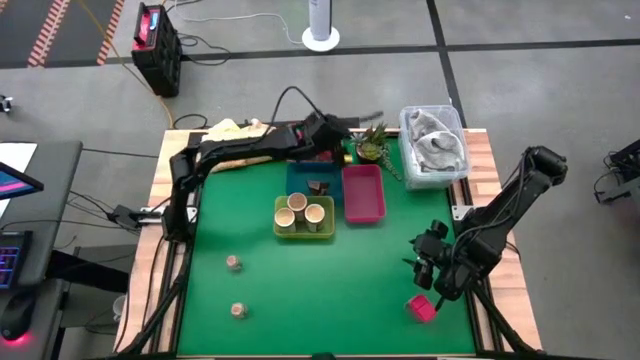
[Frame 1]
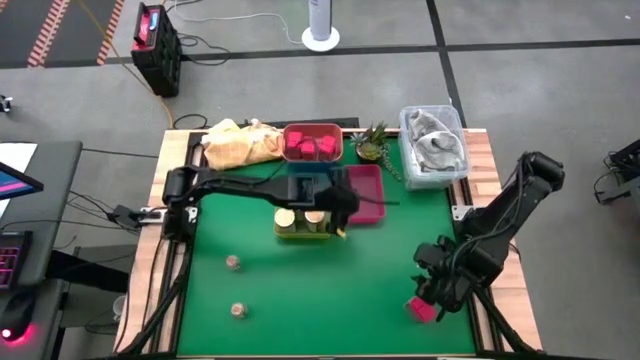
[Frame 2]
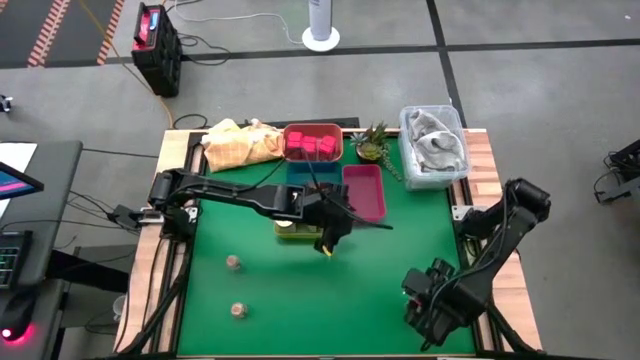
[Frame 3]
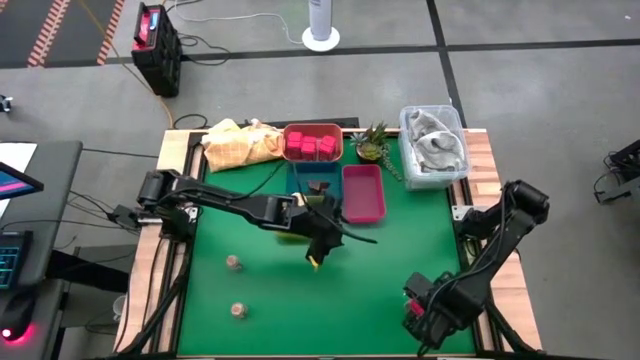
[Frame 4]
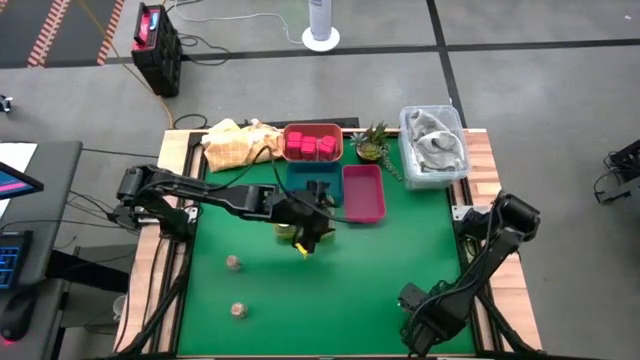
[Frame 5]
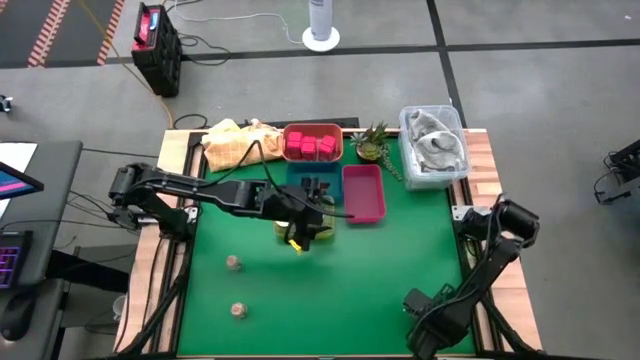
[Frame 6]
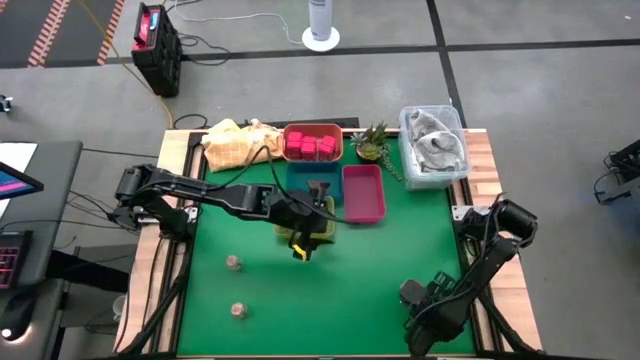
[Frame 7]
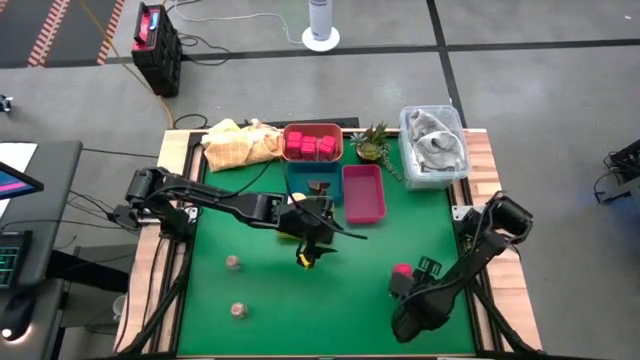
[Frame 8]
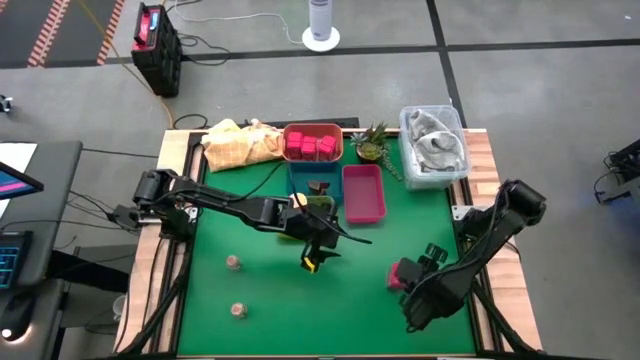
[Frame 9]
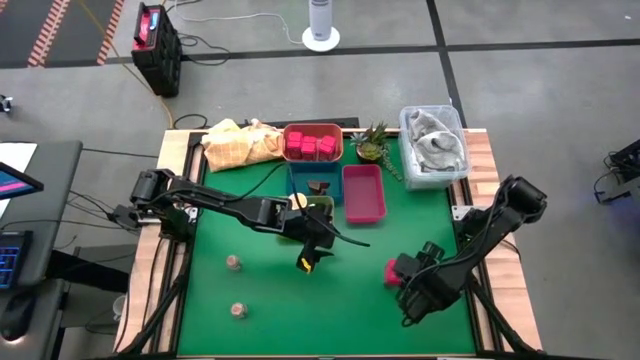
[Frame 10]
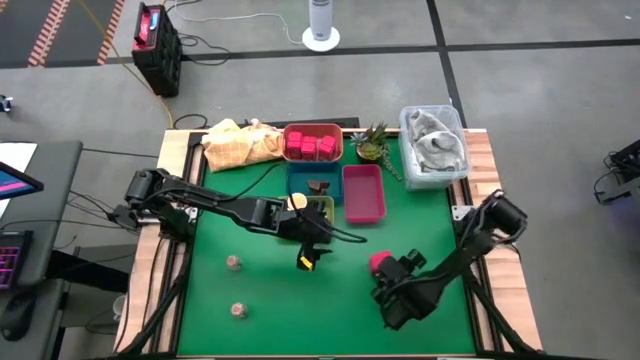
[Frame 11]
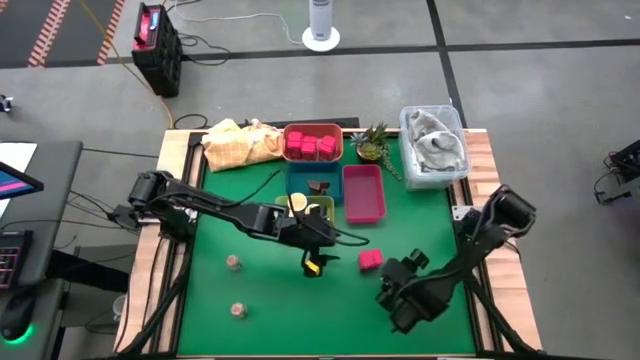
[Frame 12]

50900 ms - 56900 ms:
Task: Sort spices by type
Put the red seasoning tin into the orange bin

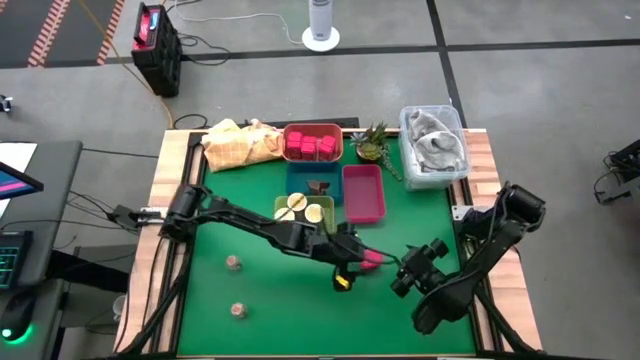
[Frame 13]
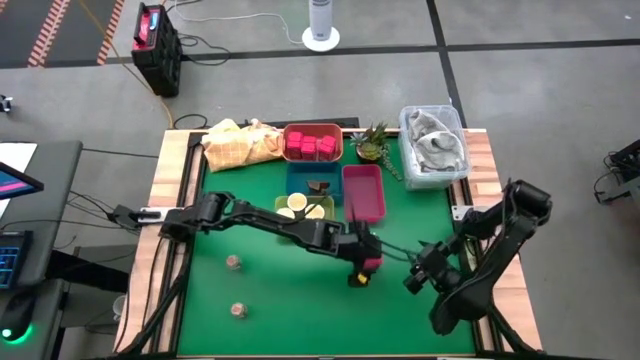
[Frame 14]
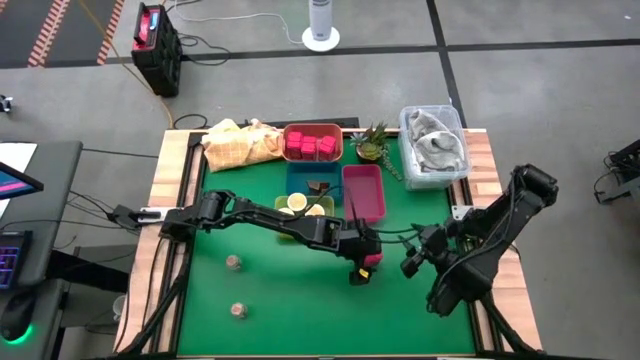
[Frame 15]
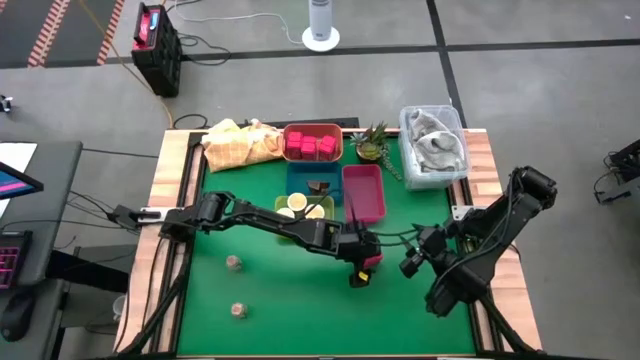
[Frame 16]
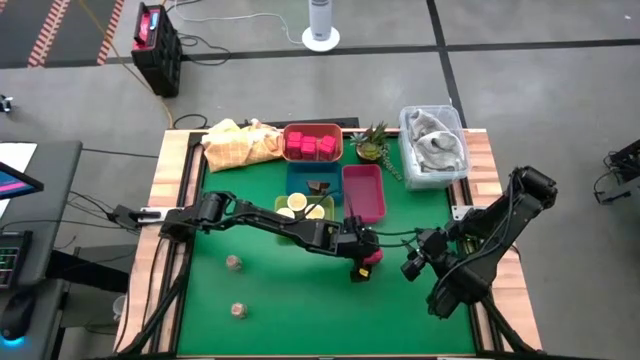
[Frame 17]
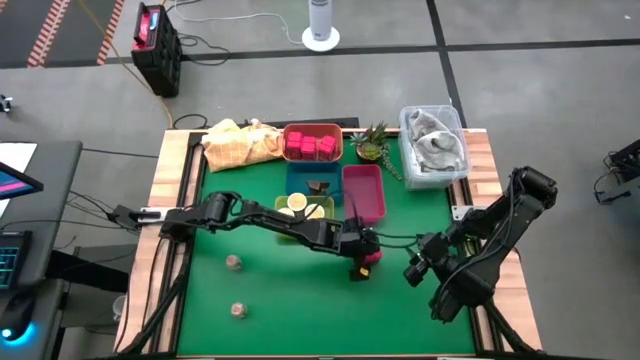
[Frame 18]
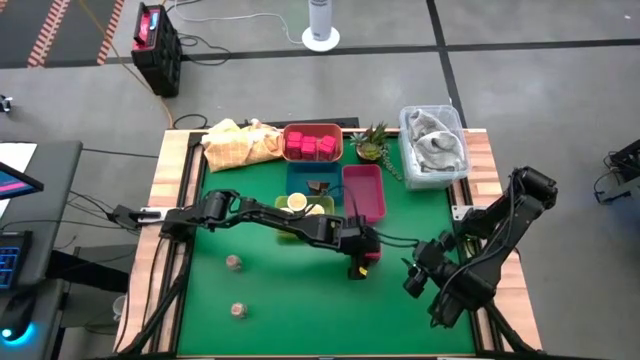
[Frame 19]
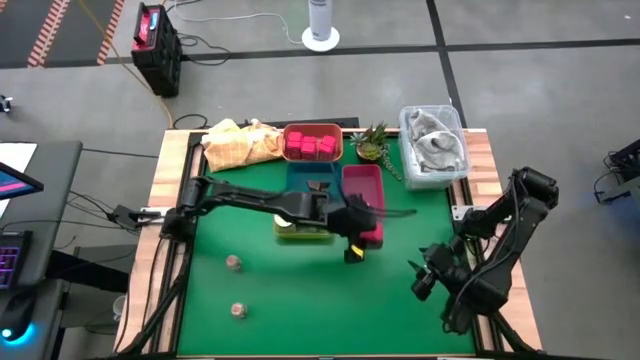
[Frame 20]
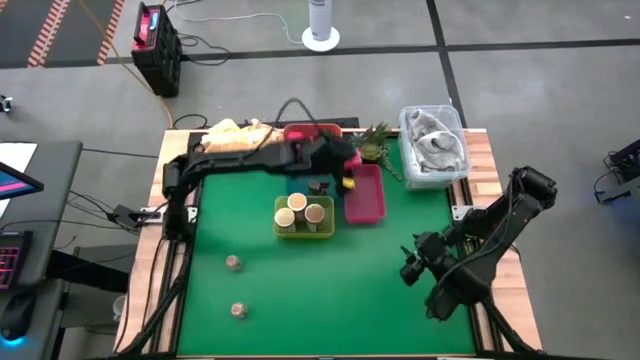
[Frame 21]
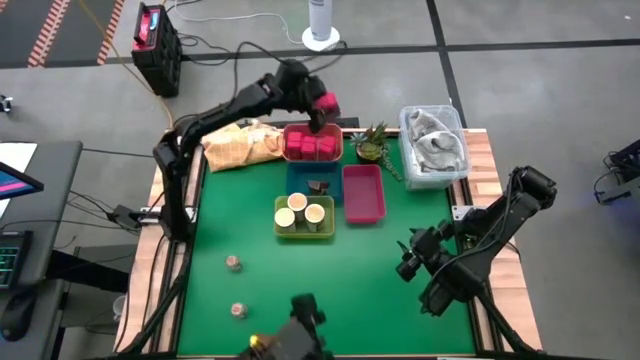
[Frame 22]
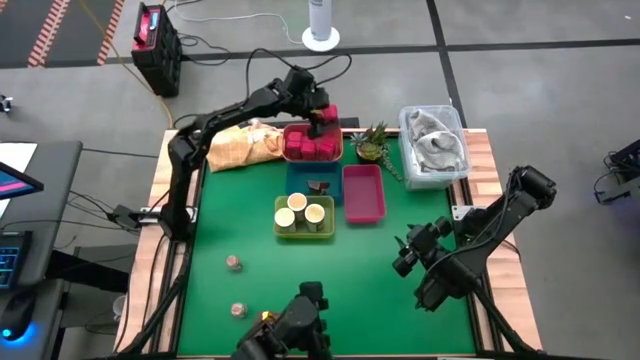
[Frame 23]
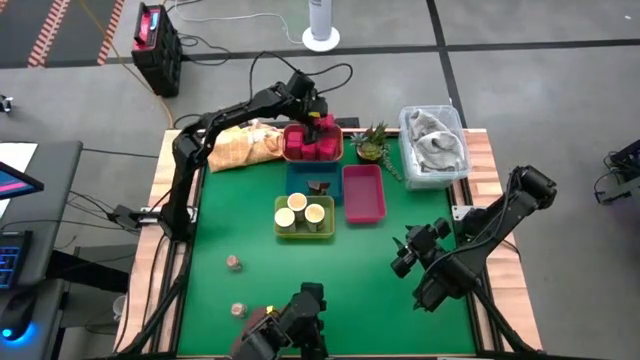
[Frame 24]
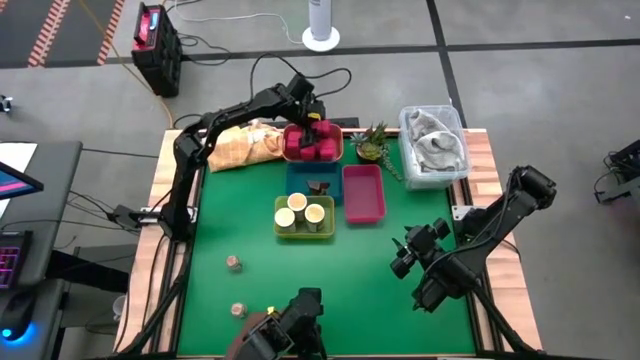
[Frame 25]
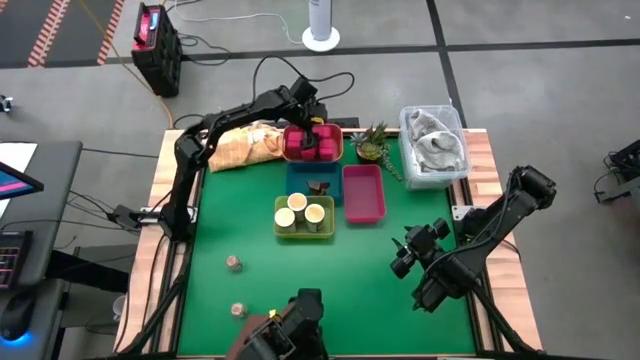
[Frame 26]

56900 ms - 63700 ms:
Put the red seasoning can into the orange bin

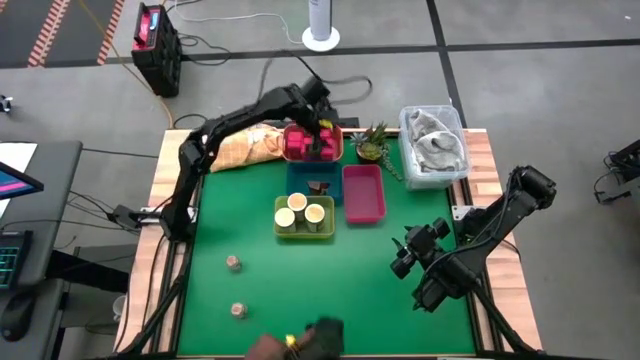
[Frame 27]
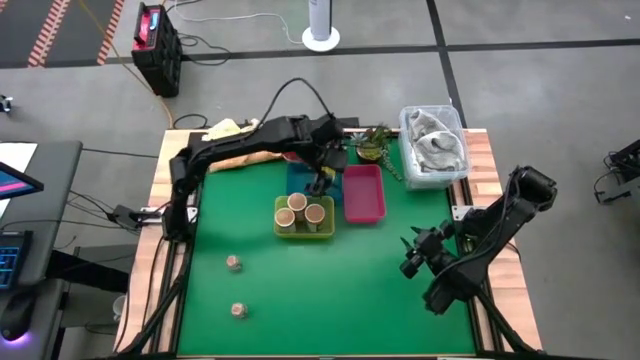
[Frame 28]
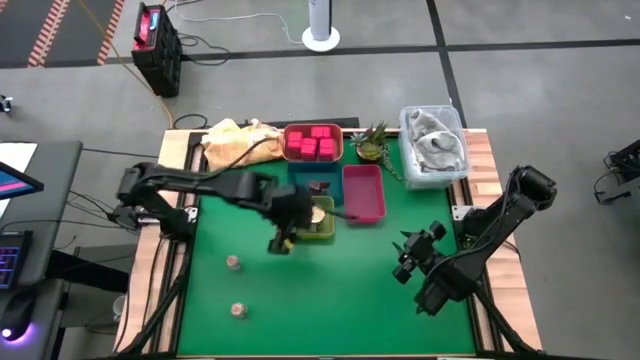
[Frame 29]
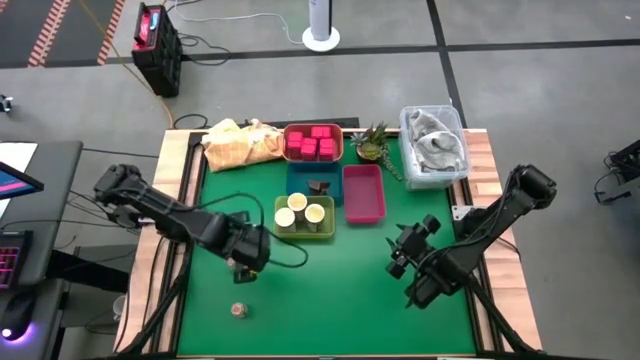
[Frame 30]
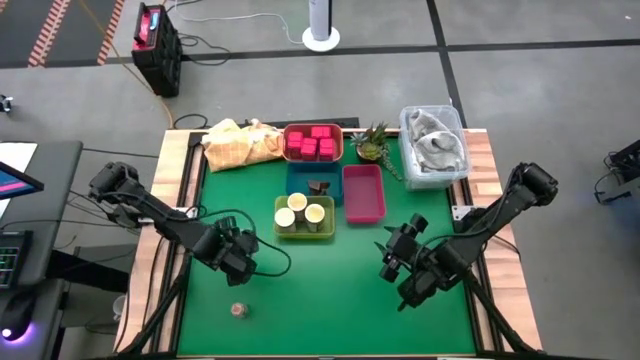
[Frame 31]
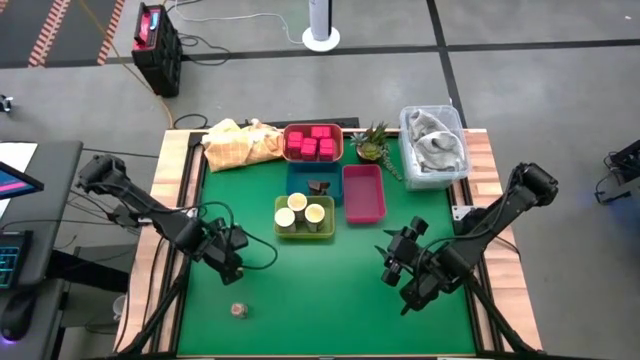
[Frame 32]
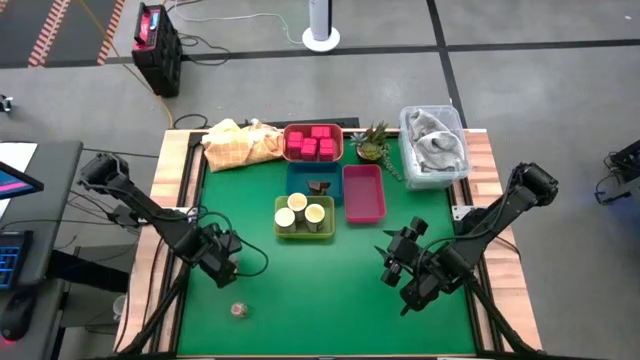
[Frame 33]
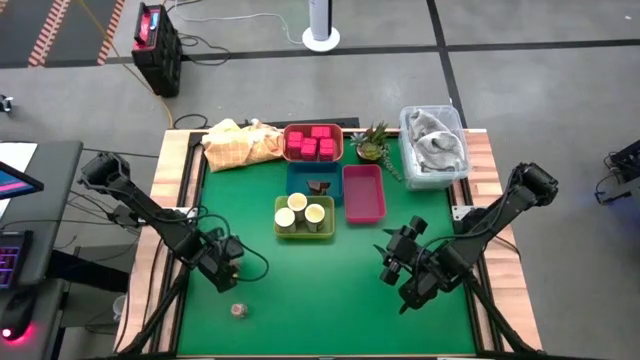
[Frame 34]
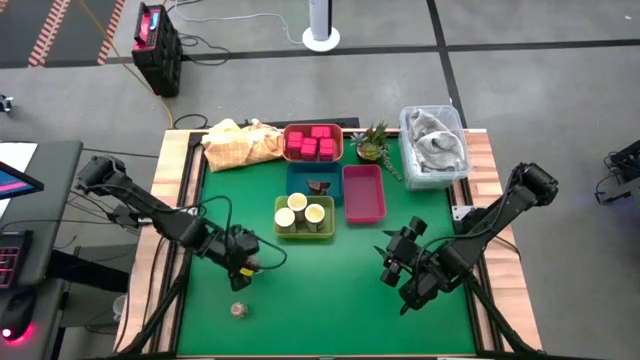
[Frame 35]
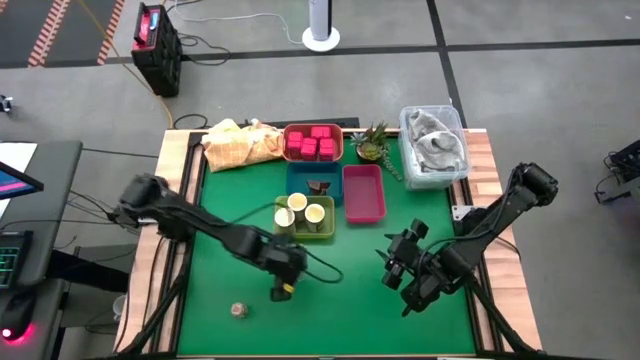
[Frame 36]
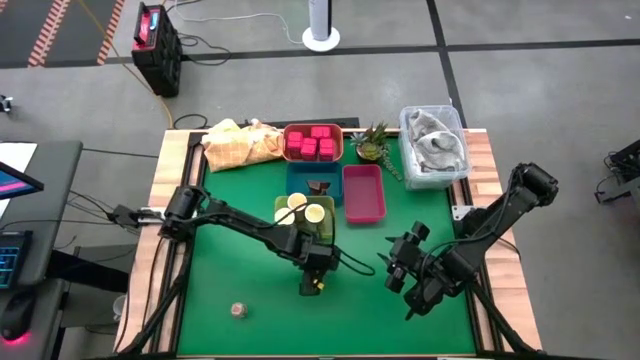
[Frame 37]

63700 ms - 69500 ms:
Move the top transparent seasoning bottle to the center of the table

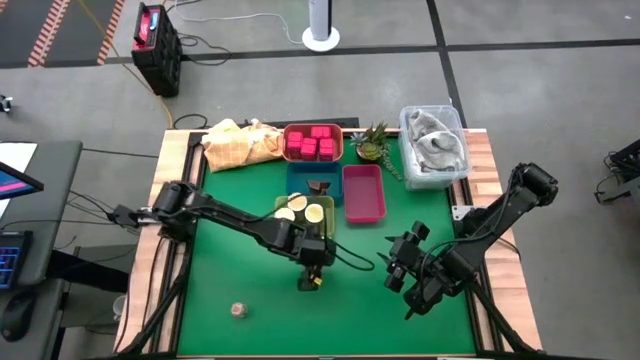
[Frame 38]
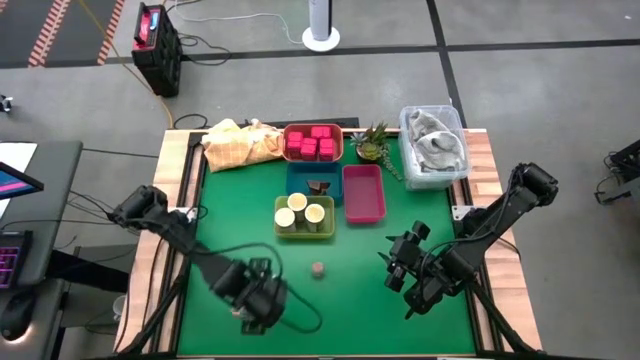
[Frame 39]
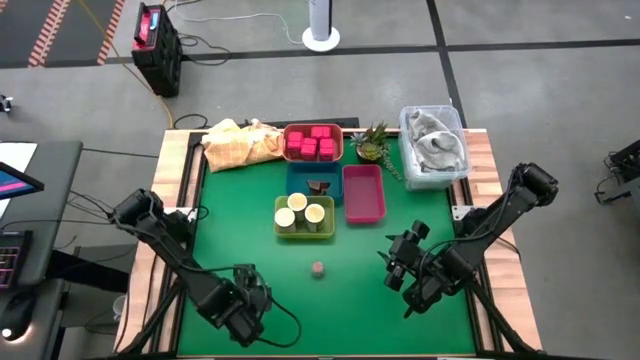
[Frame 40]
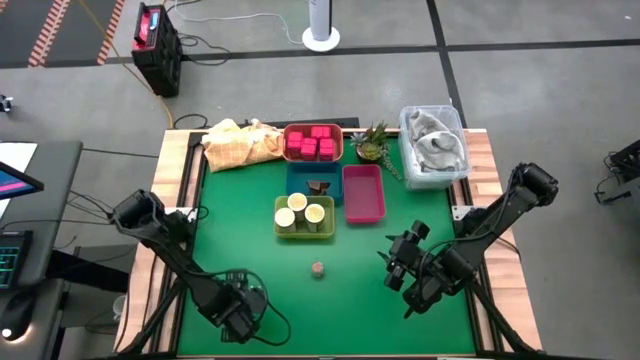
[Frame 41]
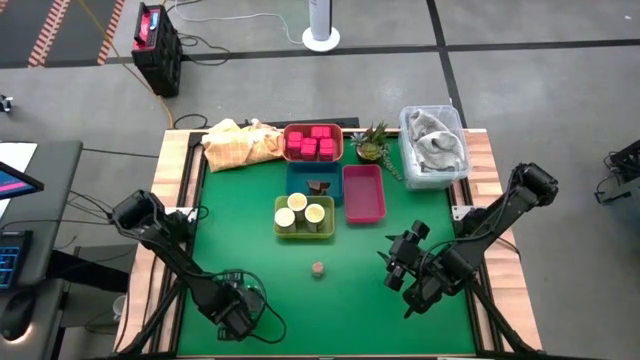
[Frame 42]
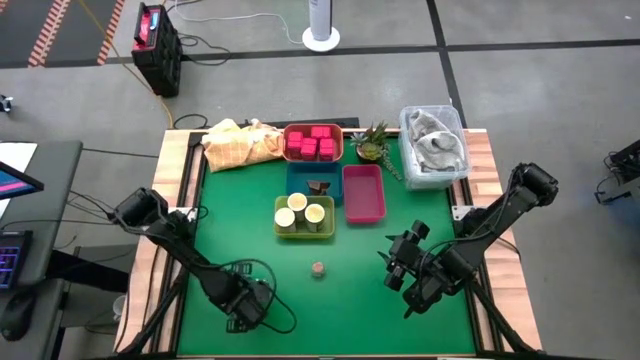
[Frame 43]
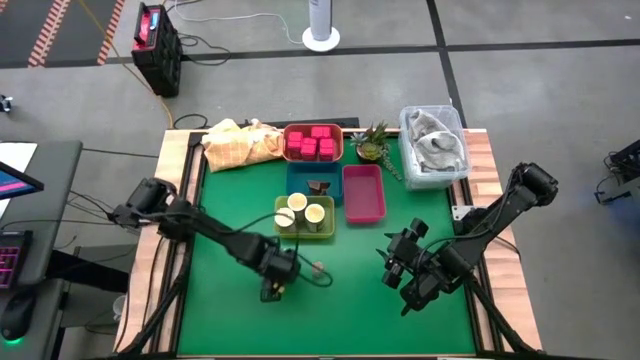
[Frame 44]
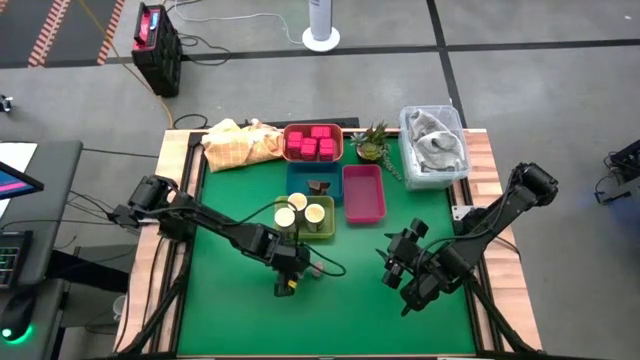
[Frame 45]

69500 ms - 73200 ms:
Move the left transparent seasoning bottle to the center of the table
